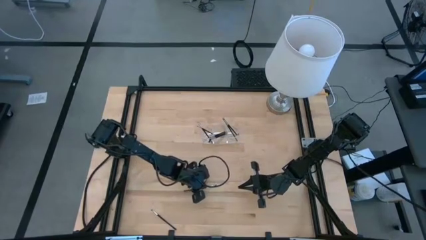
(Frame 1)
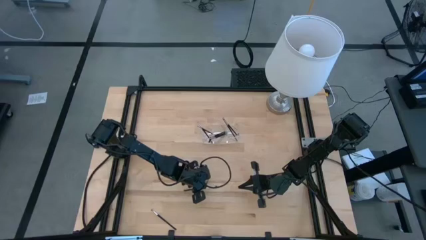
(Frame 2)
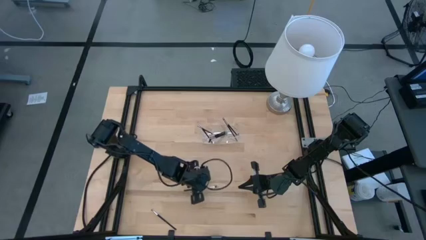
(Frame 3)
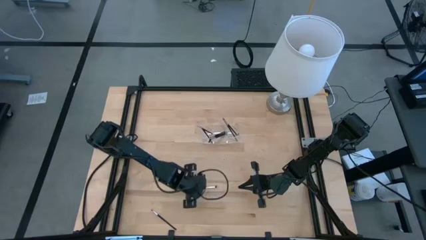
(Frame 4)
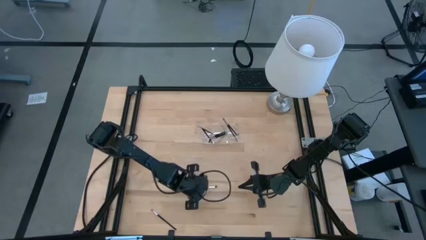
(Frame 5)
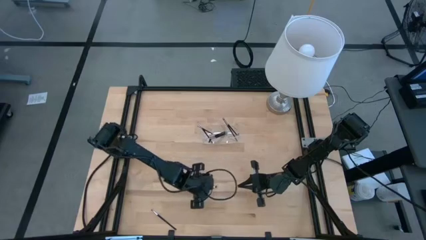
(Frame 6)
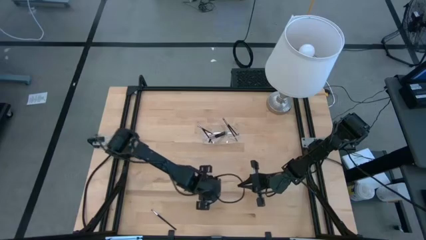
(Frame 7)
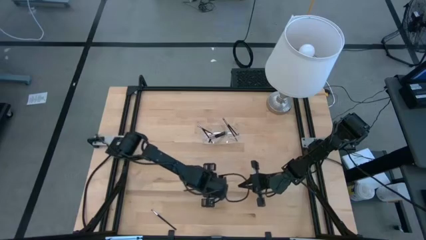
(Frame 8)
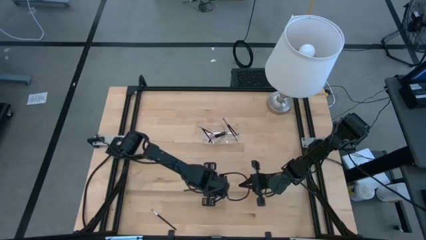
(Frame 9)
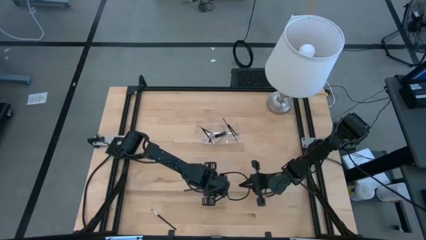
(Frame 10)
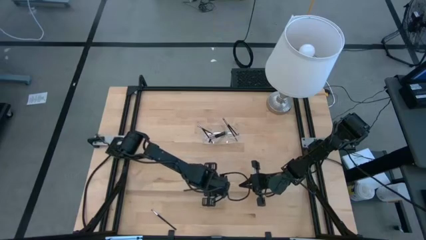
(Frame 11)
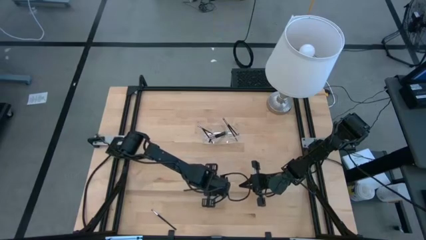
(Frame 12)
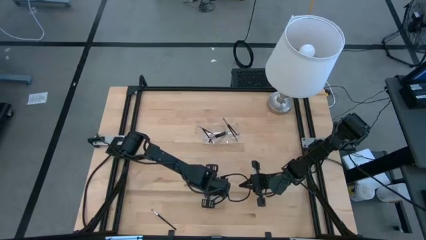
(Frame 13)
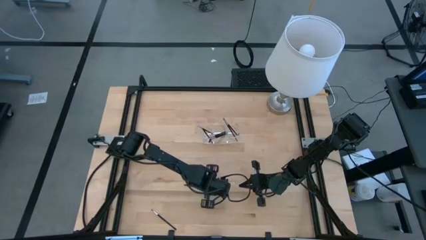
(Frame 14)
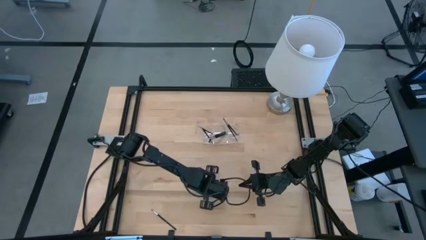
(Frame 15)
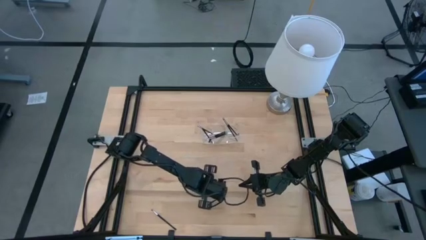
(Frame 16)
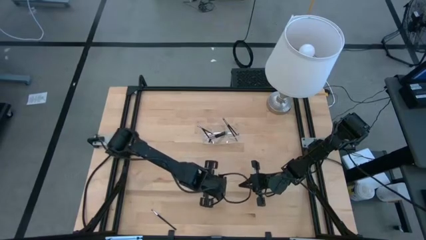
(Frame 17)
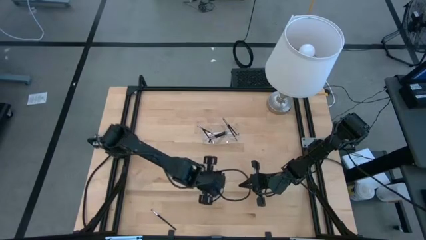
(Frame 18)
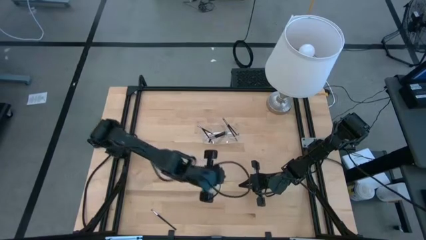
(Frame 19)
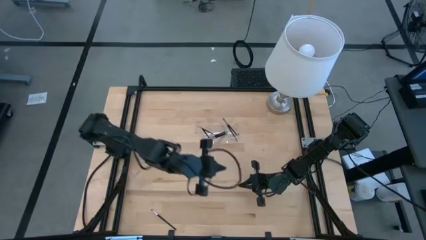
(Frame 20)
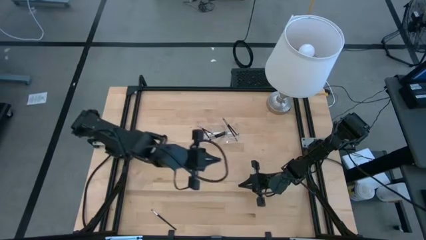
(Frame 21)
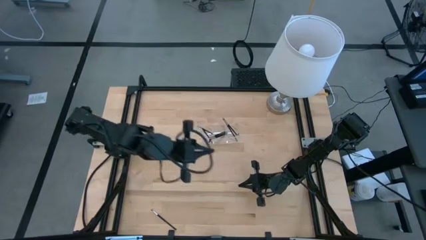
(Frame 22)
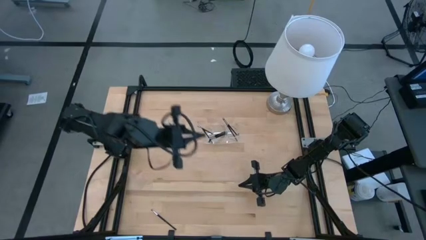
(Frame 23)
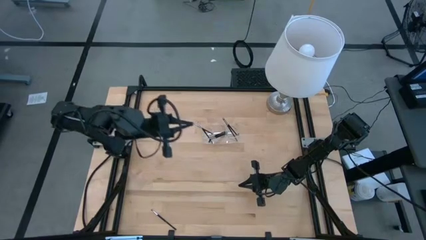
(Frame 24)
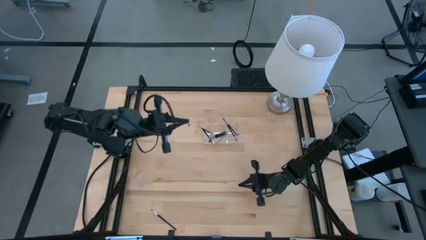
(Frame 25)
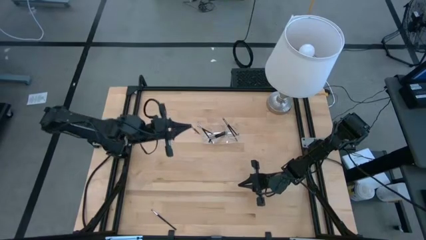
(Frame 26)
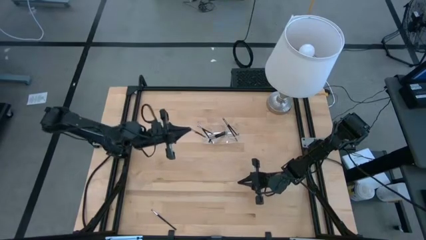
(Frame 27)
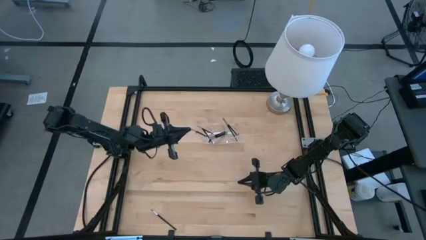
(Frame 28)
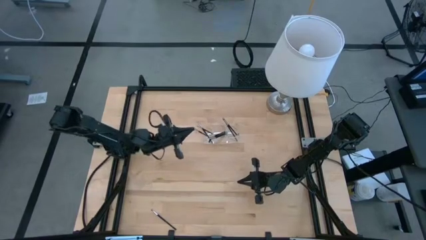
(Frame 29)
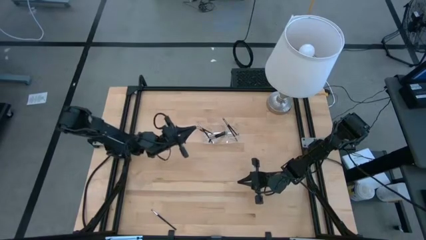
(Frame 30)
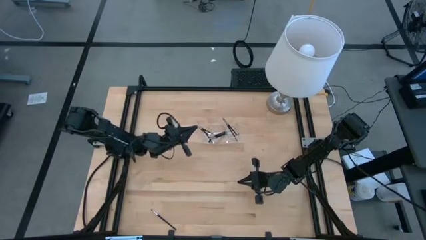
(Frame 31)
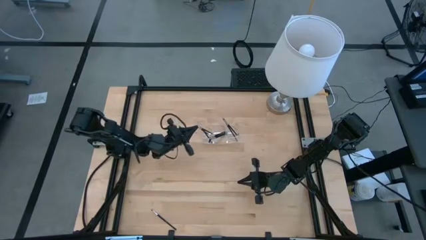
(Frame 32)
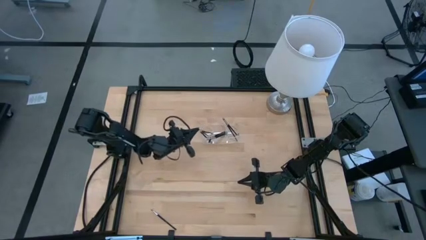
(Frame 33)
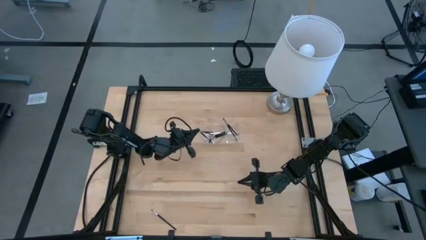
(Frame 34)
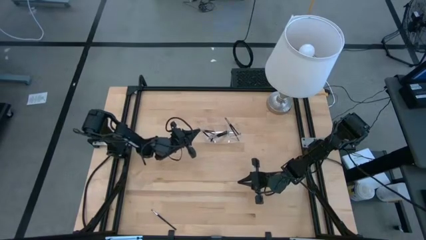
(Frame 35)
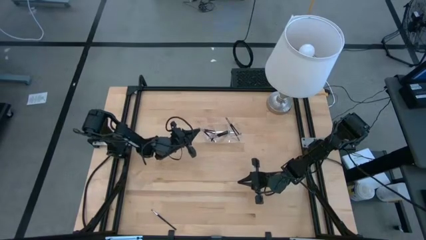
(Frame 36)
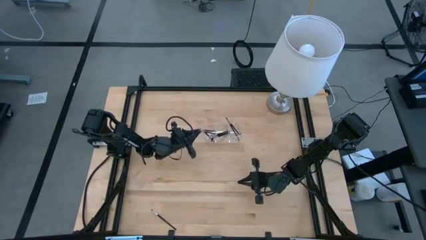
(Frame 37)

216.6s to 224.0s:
Task: Pick & Place Makeup Supplies
Put the makeup brush into the transparent organizer

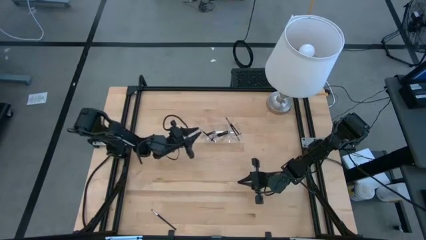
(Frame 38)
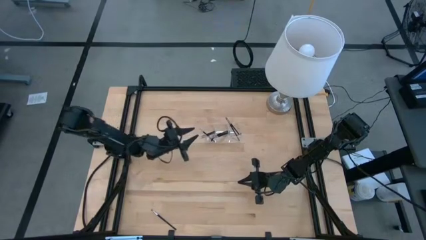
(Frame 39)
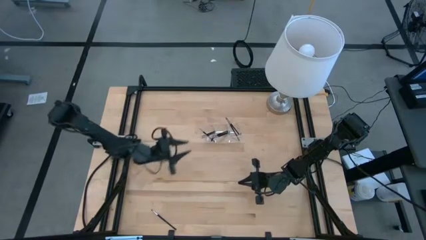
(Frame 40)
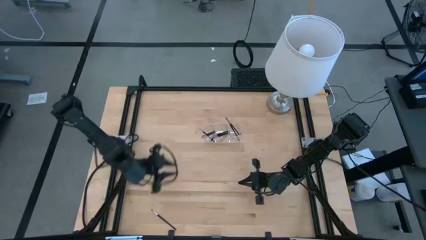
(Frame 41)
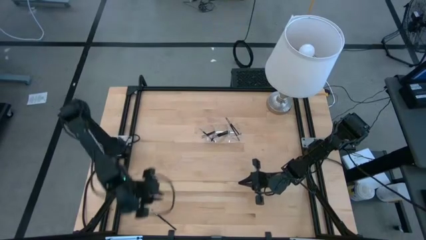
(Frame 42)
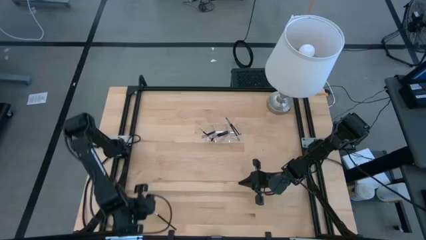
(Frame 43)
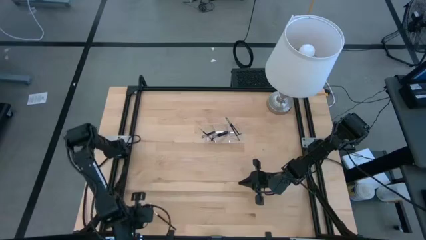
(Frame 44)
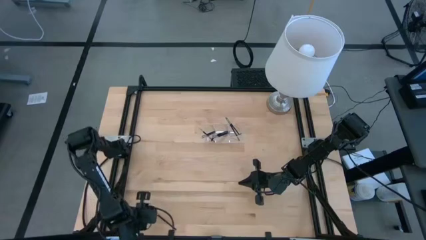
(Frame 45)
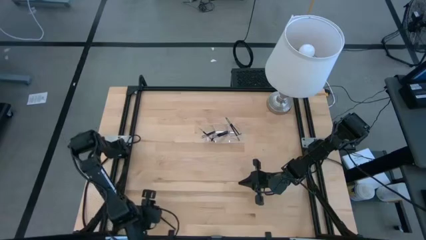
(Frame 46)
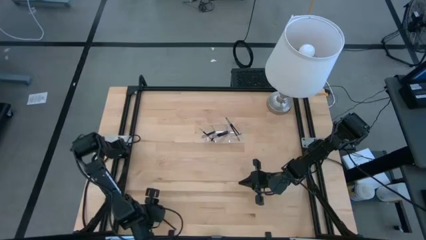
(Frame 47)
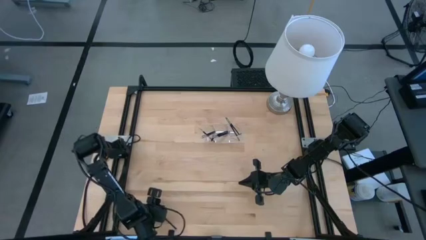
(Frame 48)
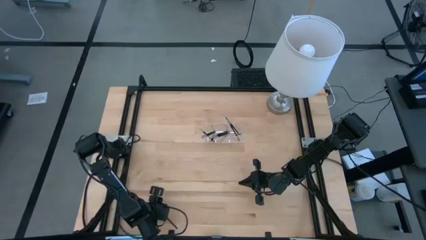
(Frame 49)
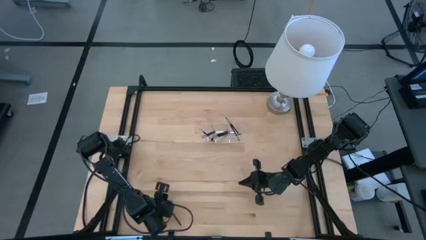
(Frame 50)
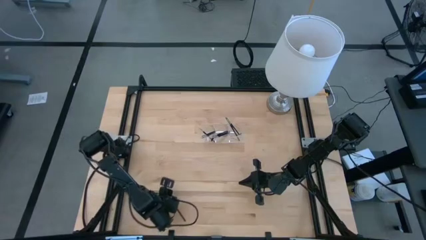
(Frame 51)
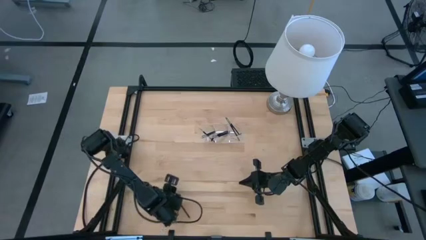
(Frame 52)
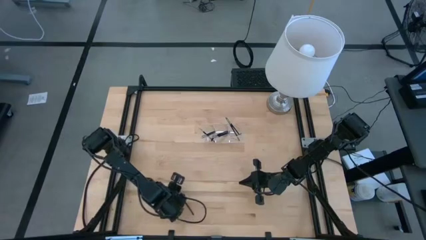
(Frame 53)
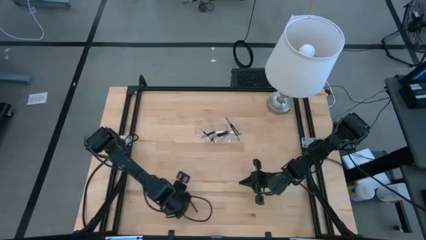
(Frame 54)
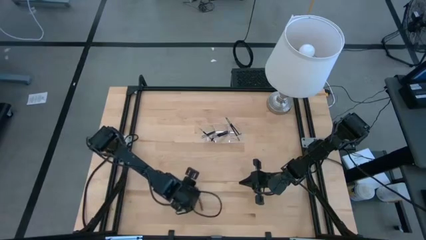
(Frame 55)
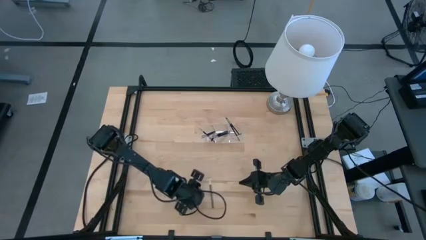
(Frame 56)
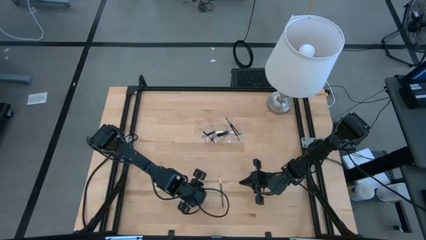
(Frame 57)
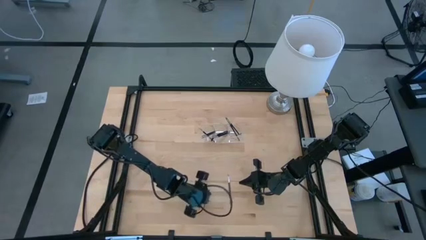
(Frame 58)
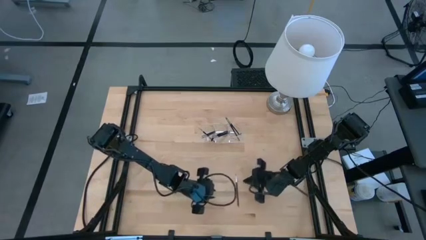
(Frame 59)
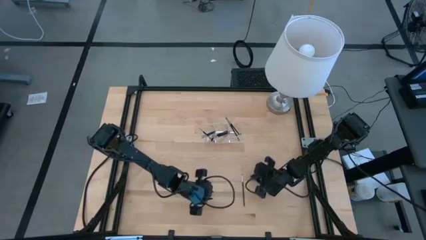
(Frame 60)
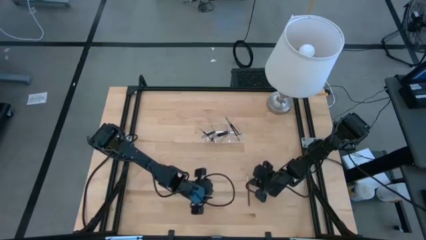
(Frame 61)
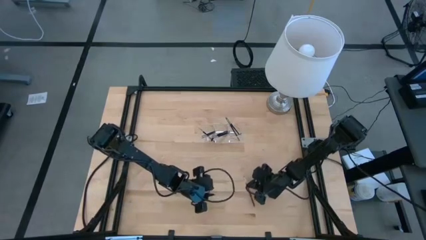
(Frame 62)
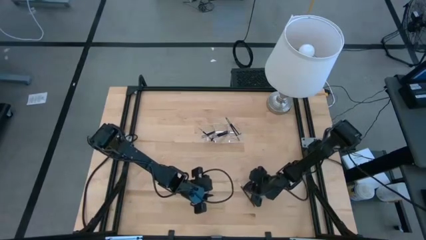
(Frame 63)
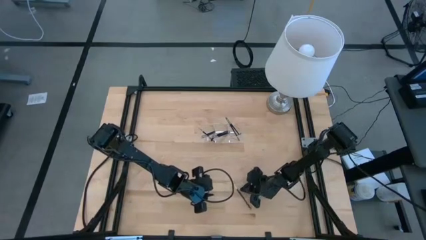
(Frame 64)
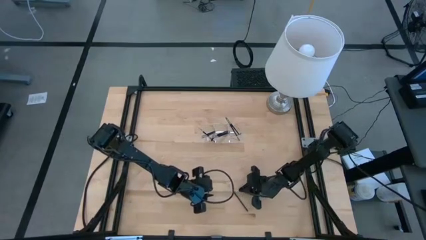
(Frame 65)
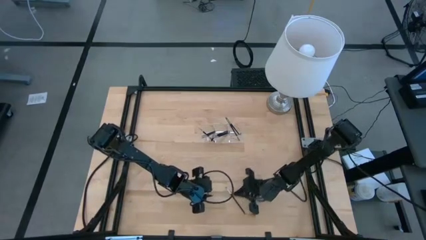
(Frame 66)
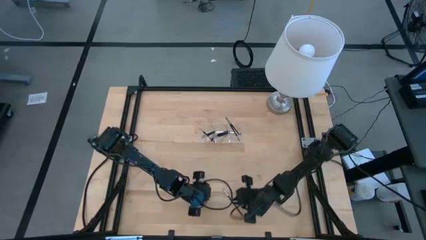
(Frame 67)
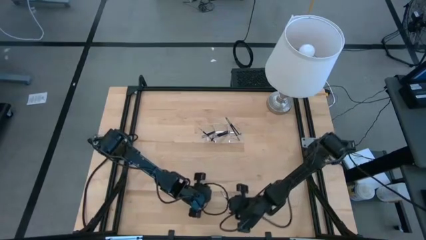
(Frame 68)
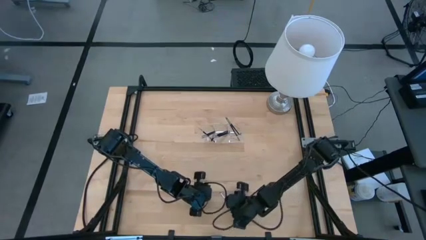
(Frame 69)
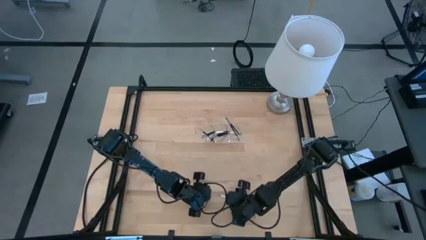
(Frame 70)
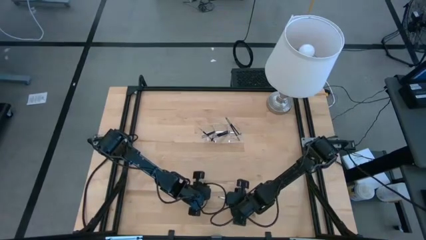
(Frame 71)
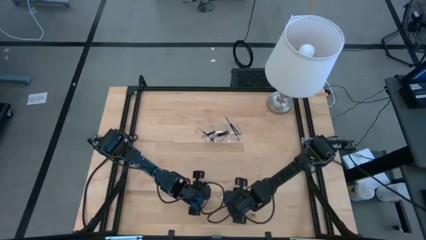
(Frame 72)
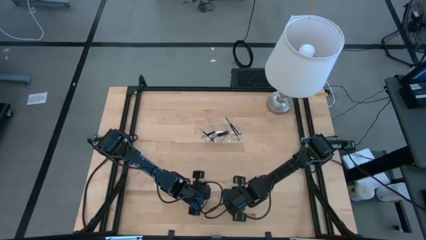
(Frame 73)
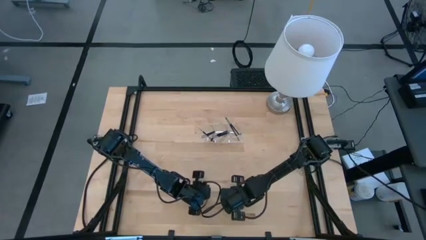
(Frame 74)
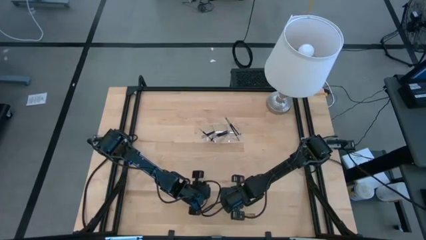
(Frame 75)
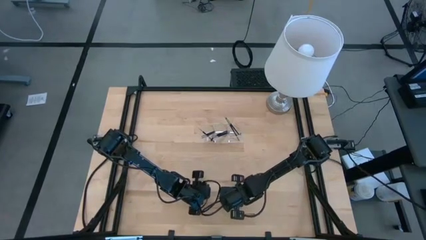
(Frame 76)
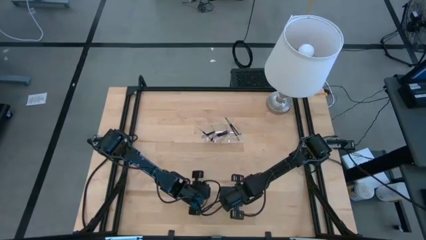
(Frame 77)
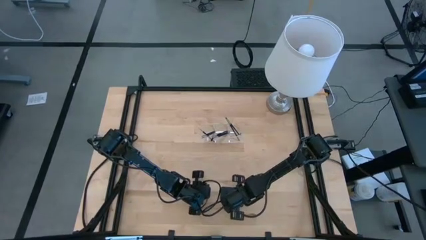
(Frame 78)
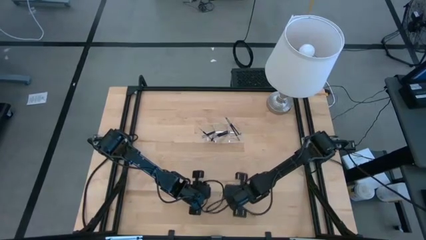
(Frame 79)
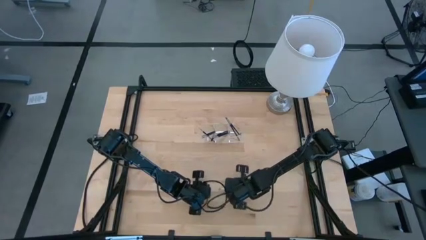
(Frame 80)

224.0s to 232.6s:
Put the makeup brush into the transparent organizer

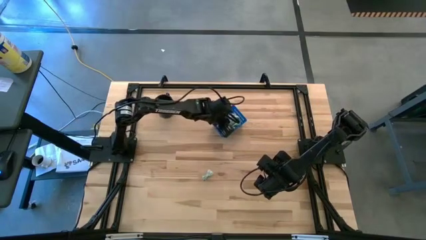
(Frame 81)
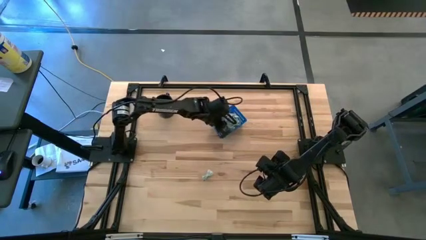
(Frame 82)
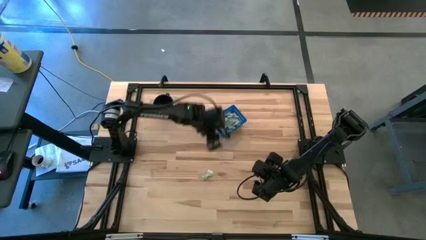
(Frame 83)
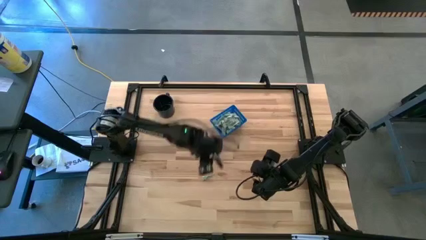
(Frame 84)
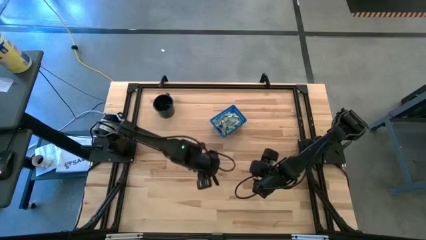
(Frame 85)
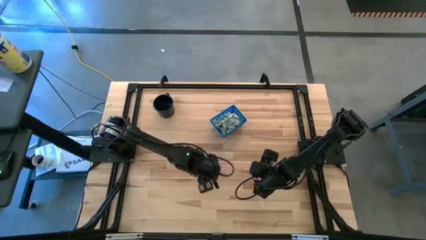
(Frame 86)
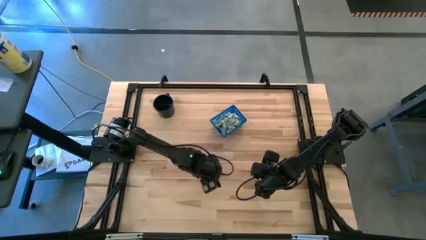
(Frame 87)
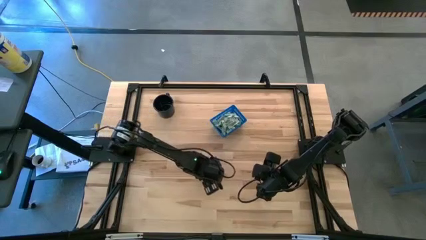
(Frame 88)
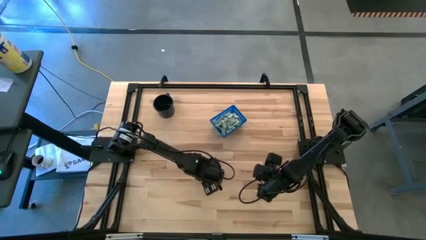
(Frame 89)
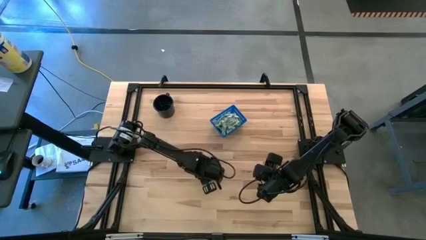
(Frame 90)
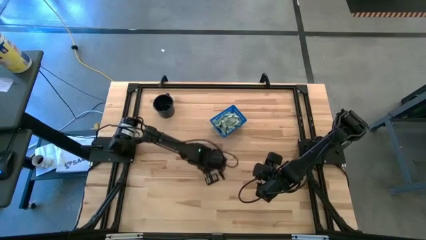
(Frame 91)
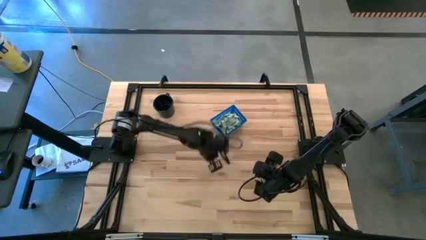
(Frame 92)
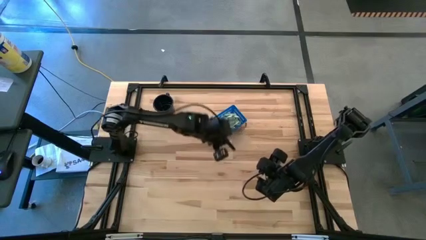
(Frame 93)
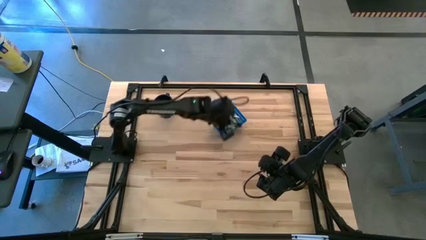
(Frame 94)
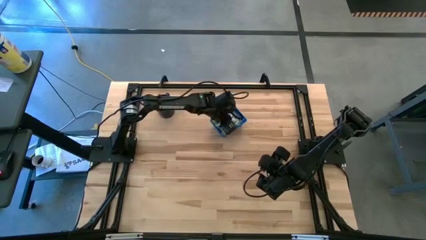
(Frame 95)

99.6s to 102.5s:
Task: Pick and place Stevia / Truvia into bins
Put the green stevia packet into the blue bin
